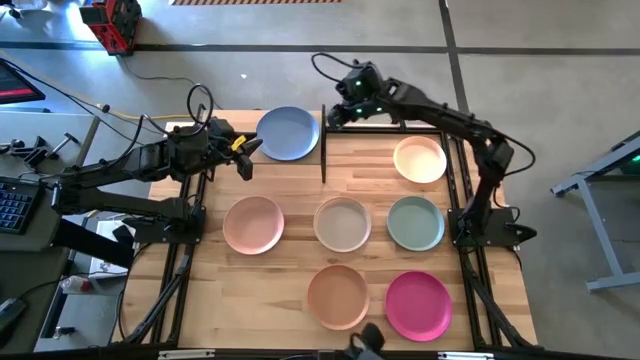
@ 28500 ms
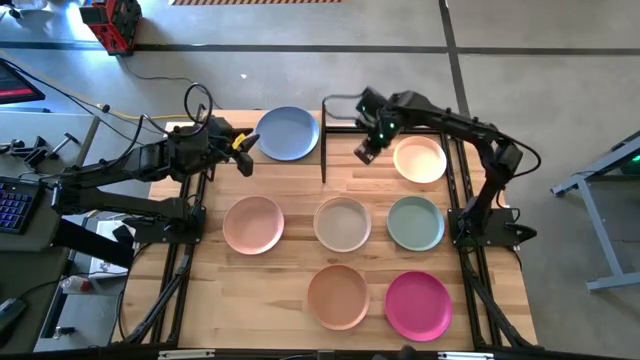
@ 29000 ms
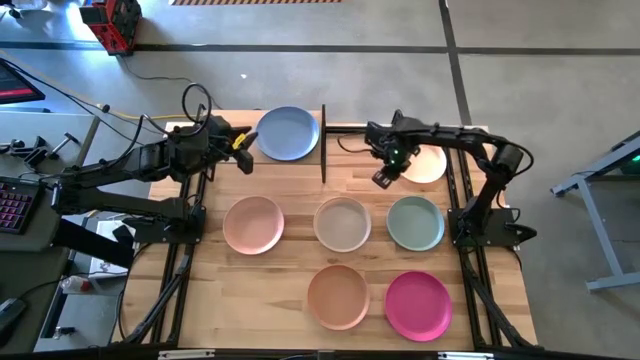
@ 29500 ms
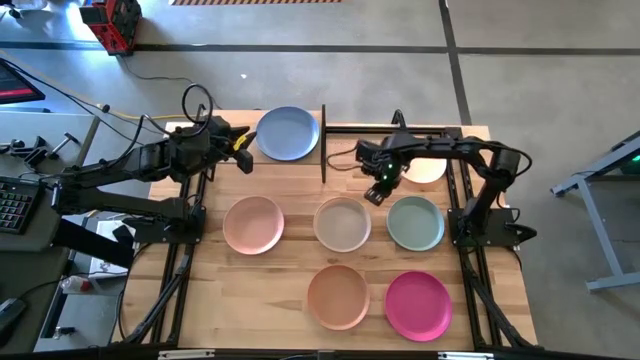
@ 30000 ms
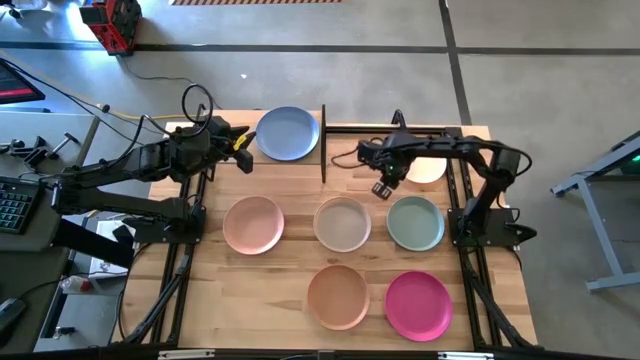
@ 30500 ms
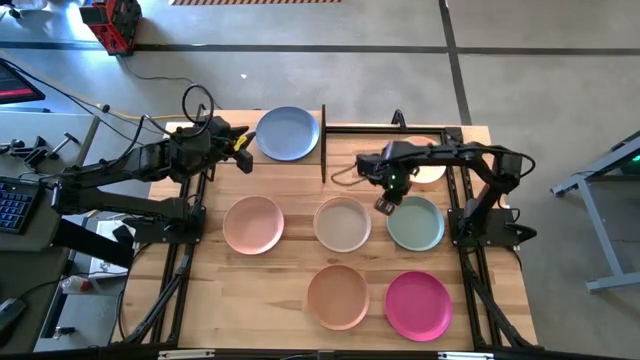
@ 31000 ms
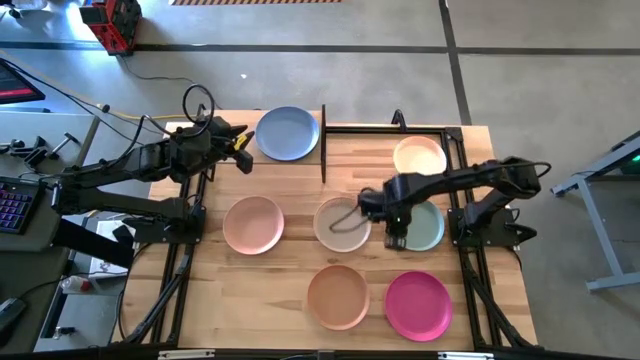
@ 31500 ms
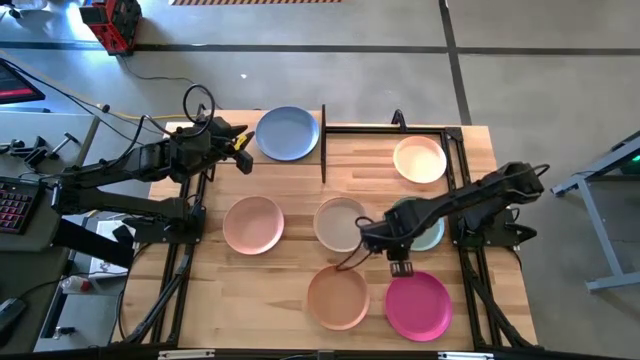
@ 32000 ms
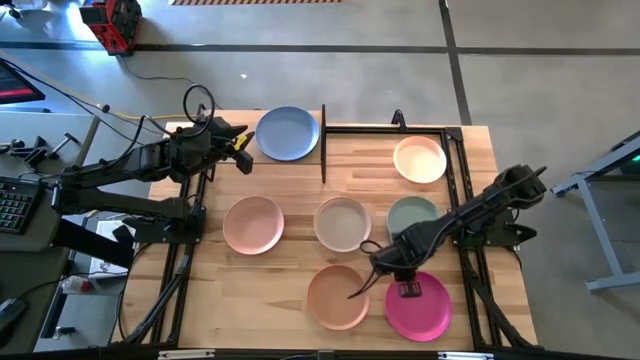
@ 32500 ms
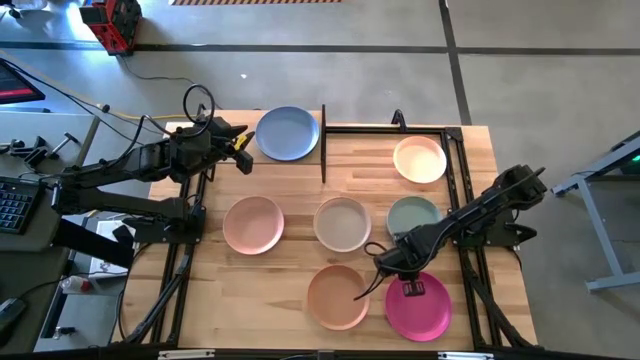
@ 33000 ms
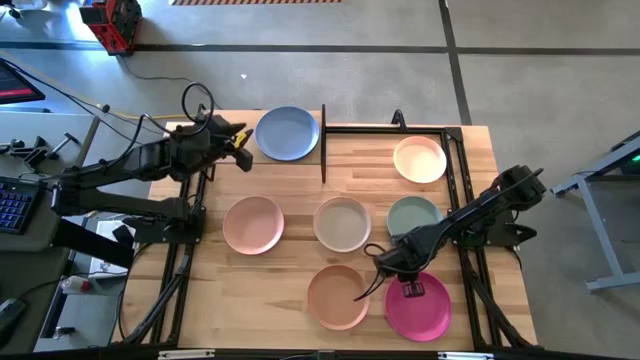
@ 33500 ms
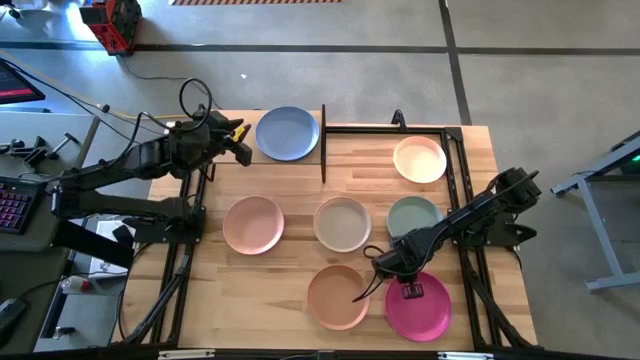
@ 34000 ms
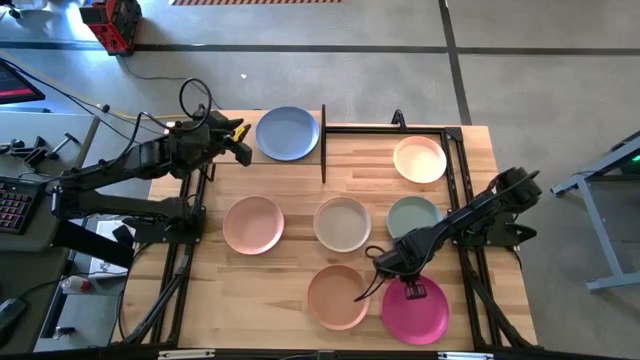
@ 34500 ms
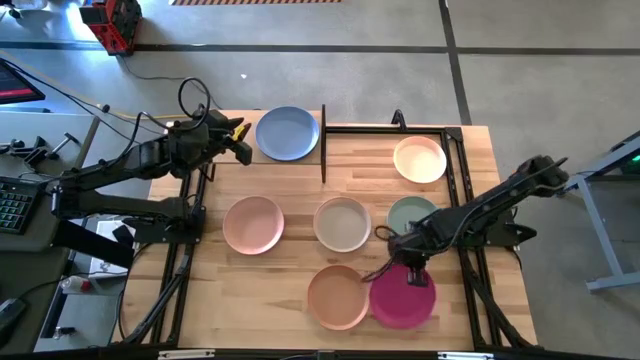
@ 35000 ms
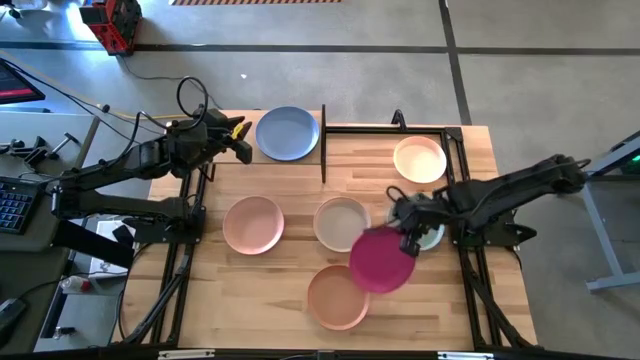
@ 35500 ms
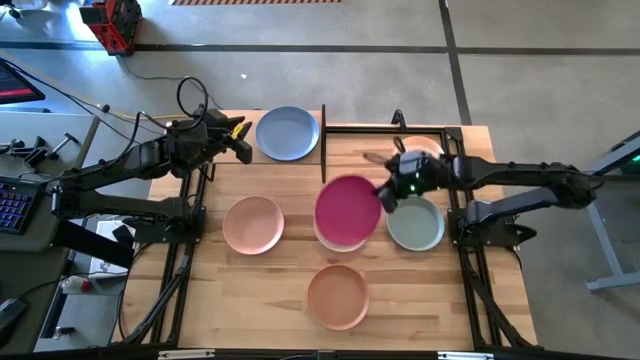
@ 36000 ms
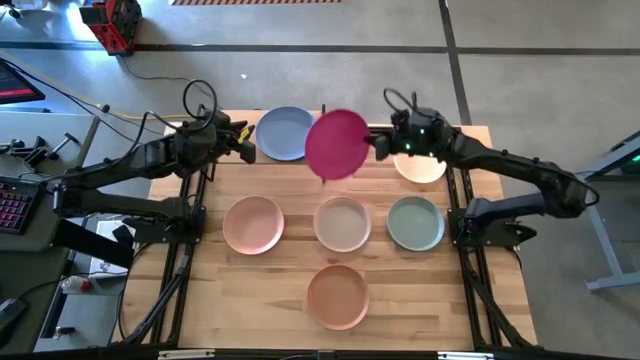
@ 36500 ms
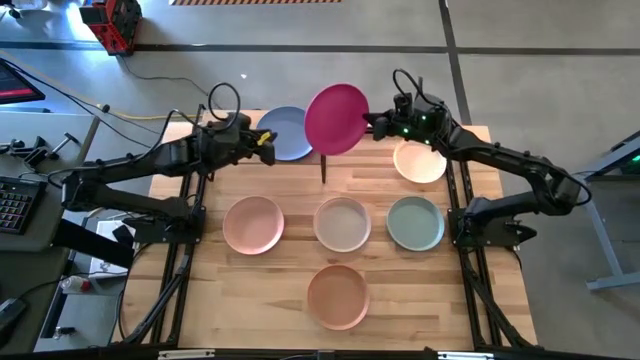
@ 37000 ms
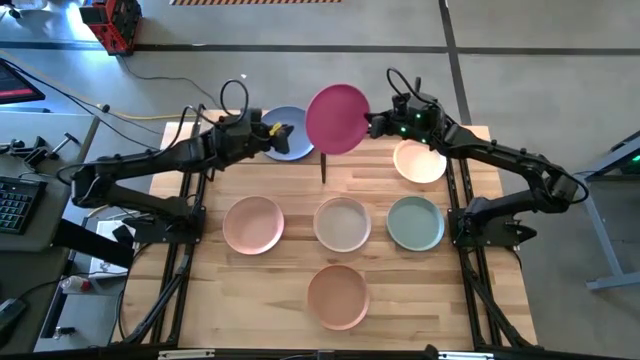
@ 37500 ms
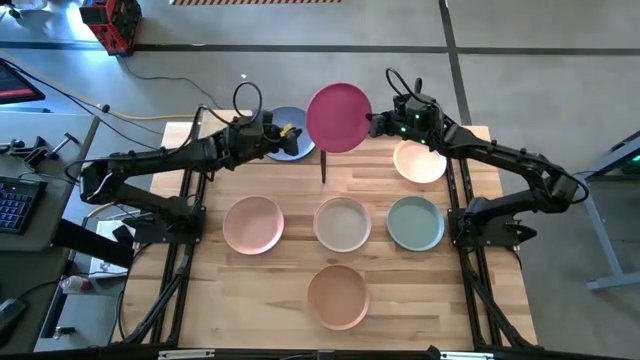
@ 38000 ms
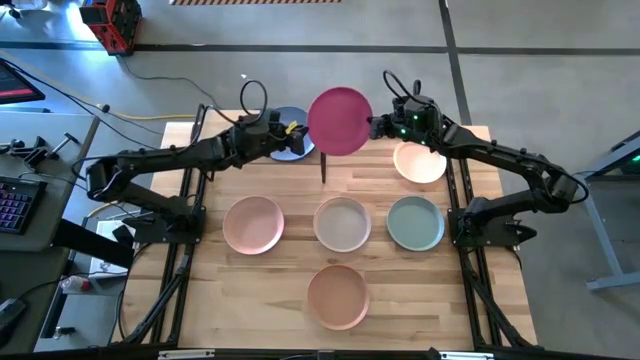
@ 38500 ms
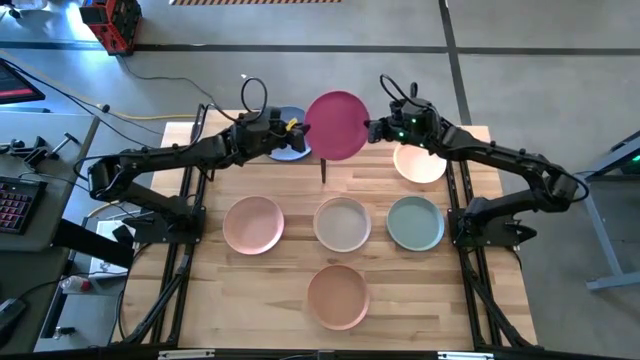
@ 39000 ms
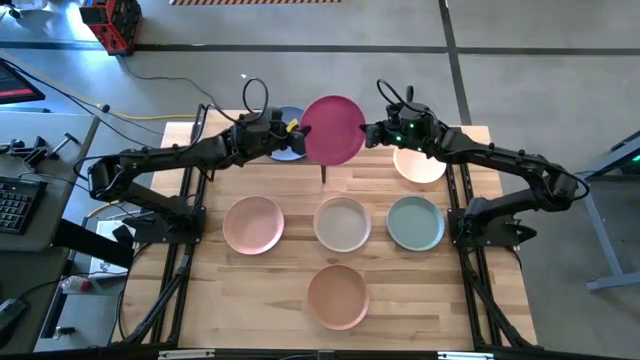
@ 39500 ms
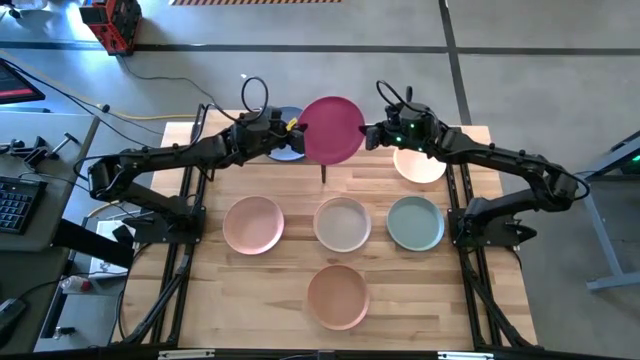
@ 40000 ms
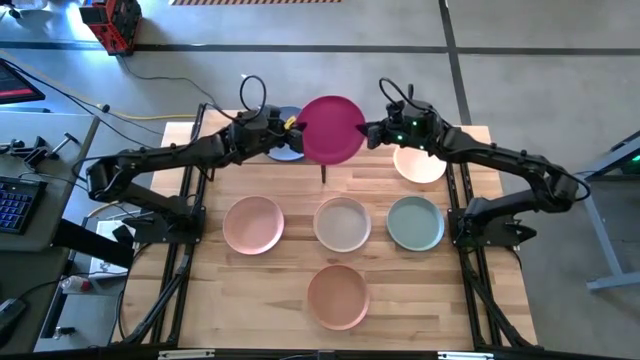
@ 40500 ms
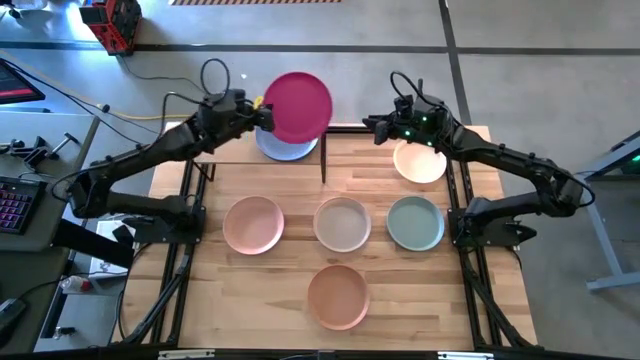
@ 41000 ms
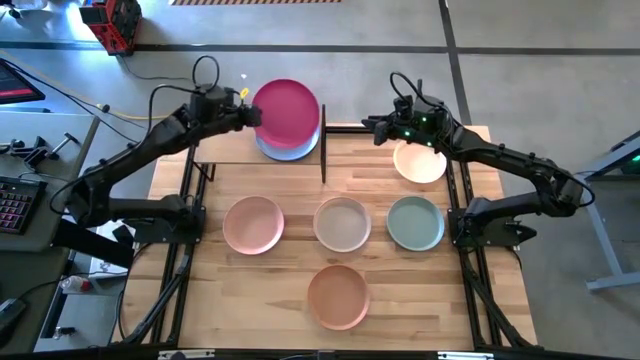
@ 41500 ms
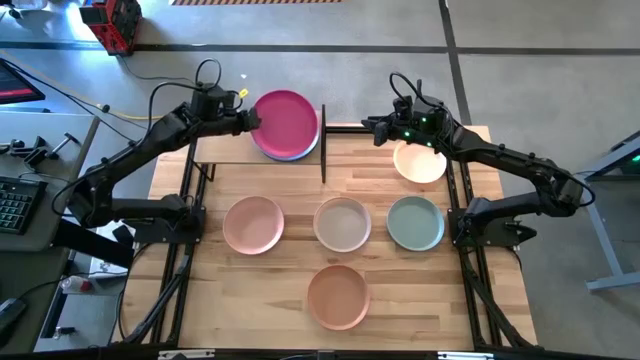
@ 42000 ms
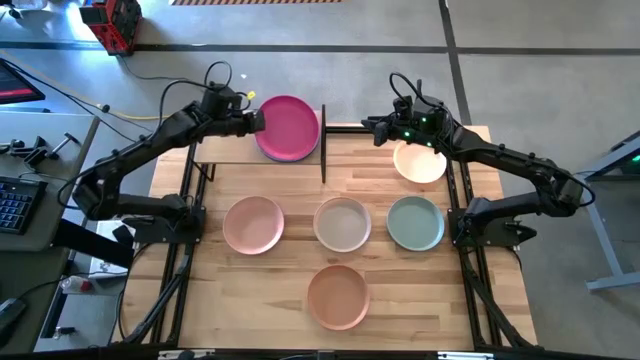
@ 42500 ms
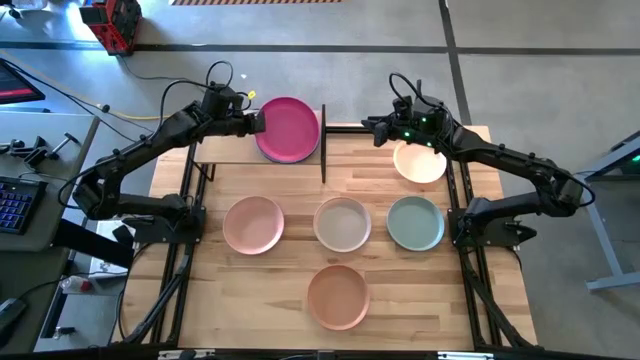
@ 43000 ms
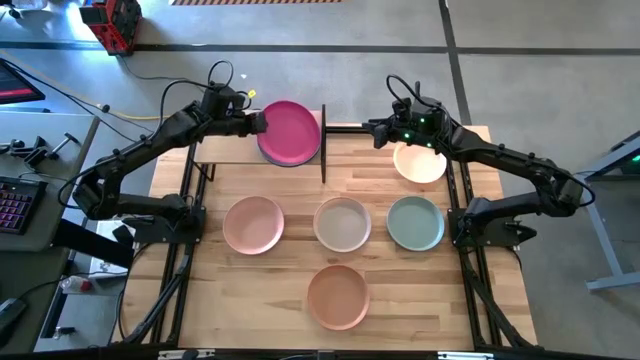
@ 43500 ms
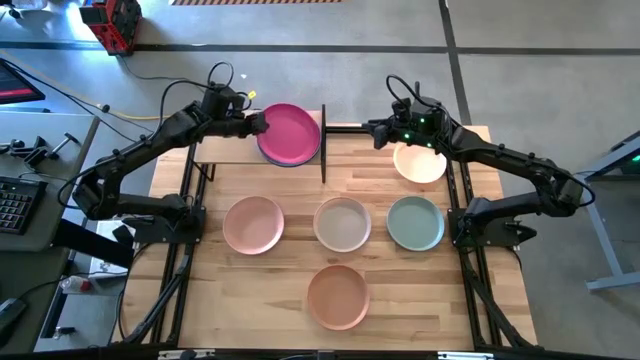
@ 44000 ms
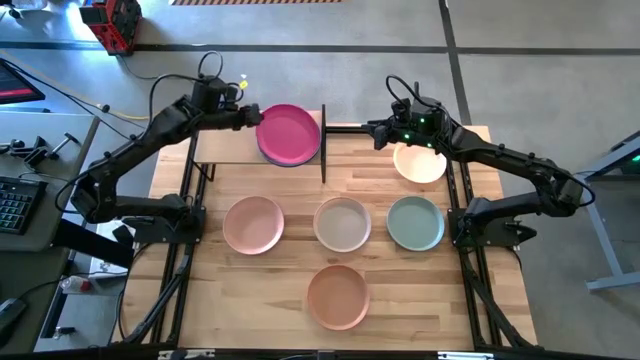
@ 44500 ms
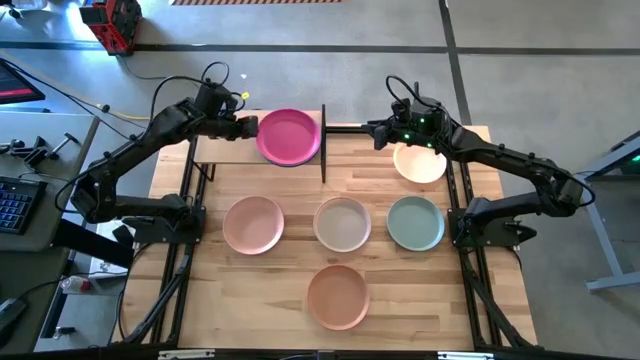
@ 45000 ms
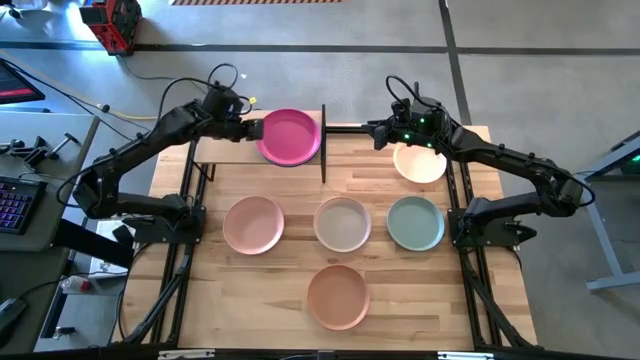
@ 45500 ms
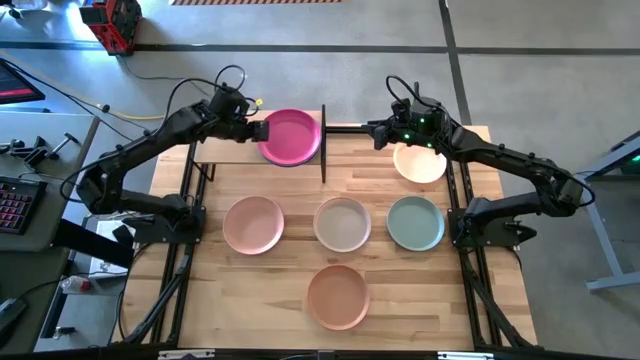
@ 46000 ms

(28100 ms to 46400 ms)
Task: Place and stack plates onto a shelf
Stack the pink plate on top of the blue plate on the shelf
